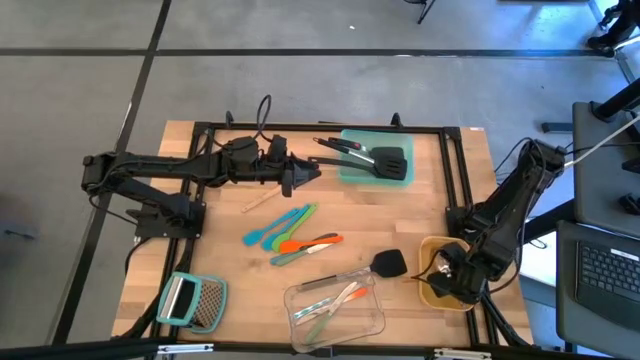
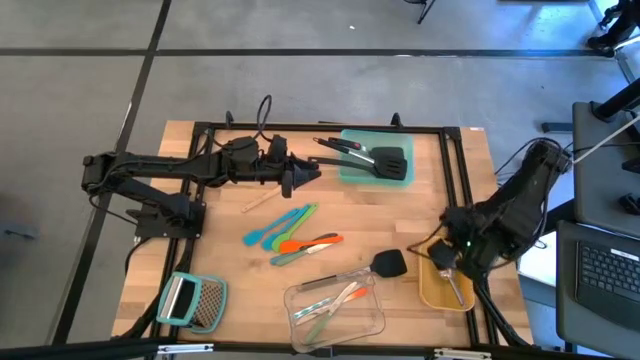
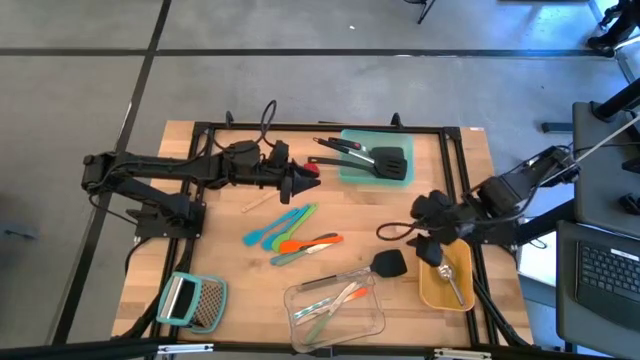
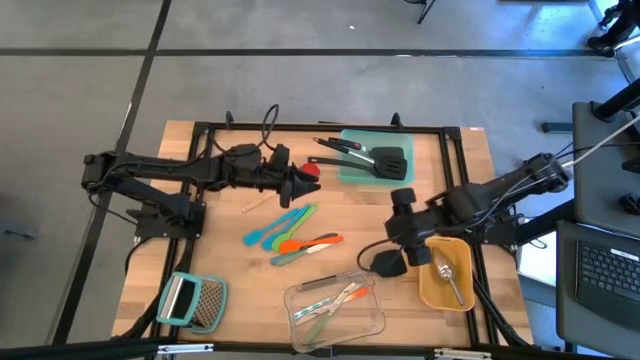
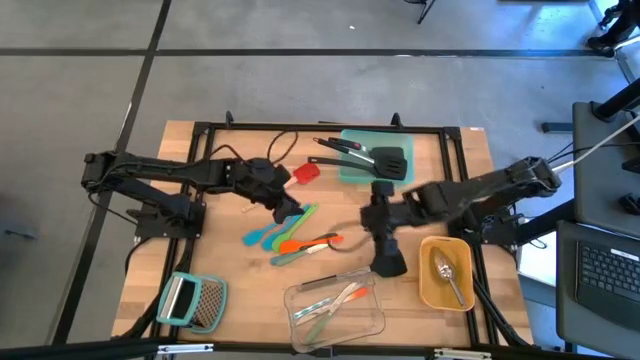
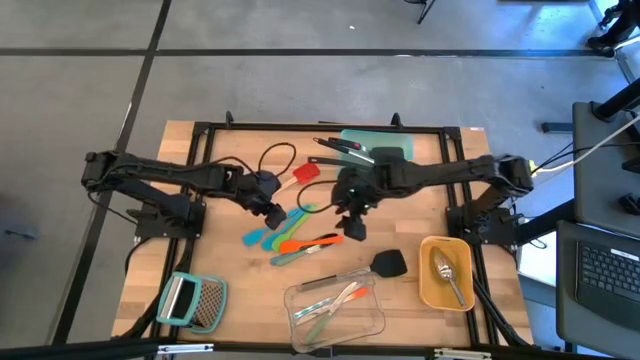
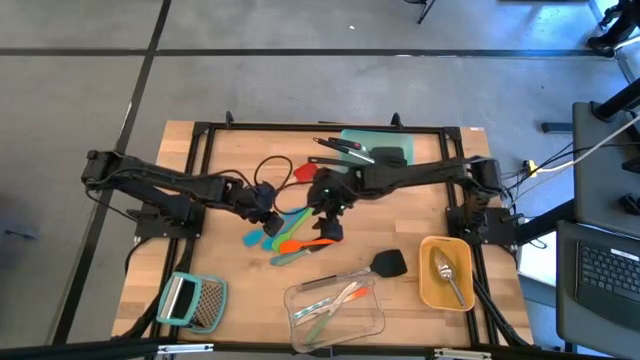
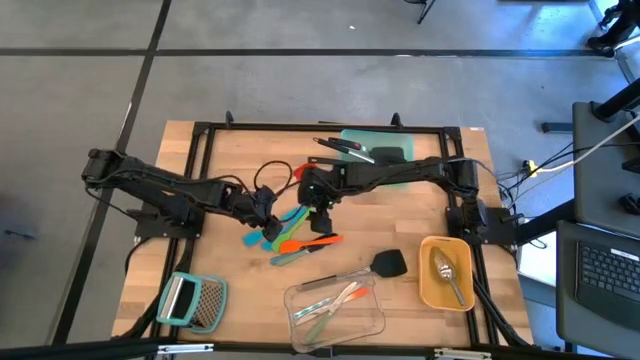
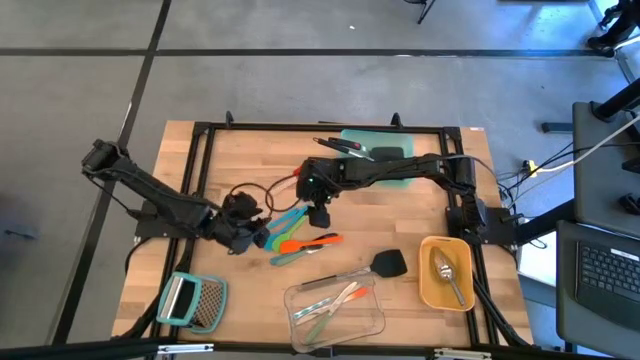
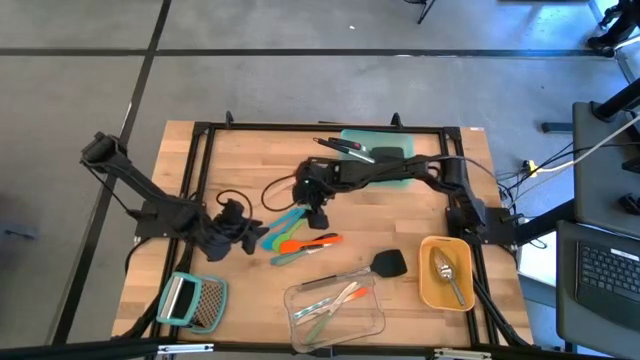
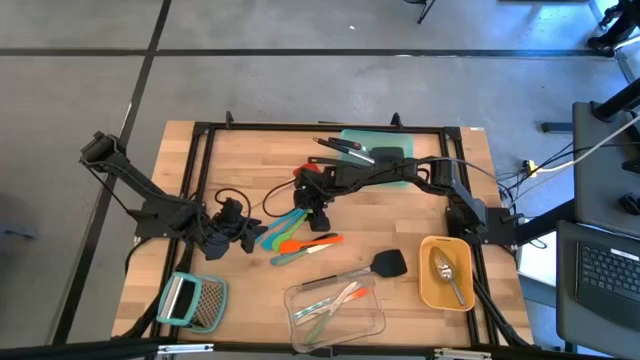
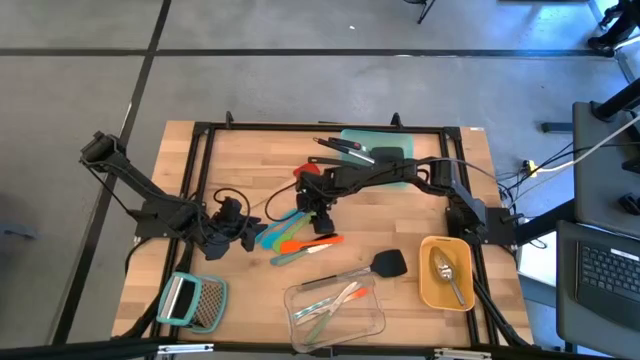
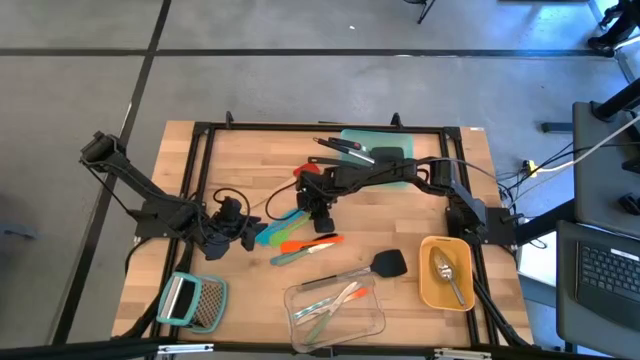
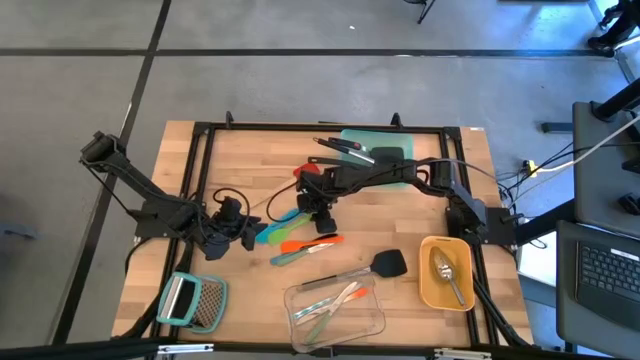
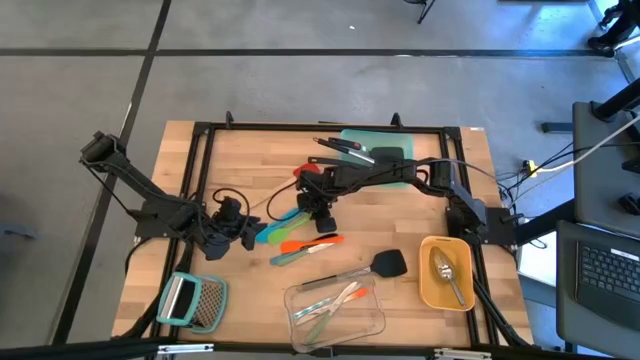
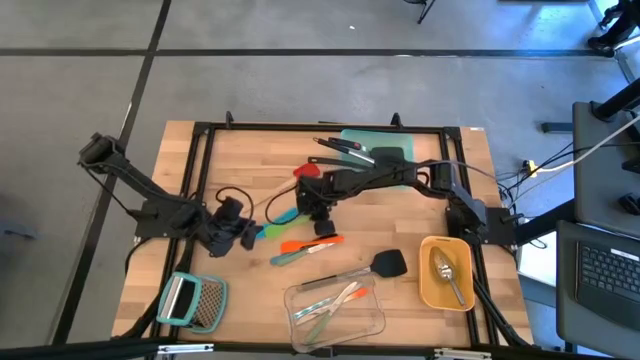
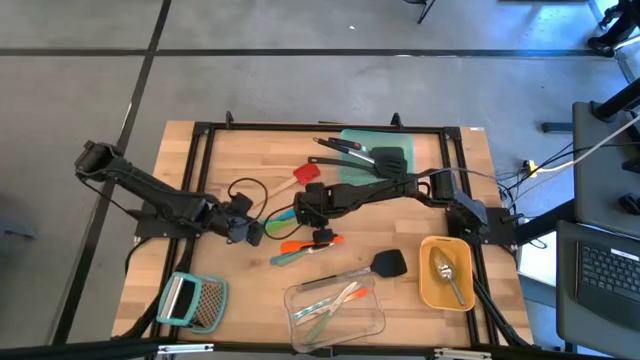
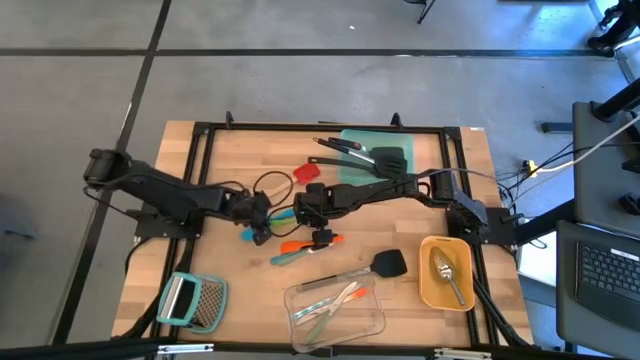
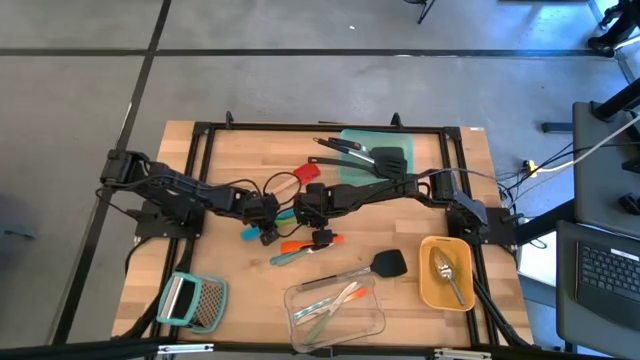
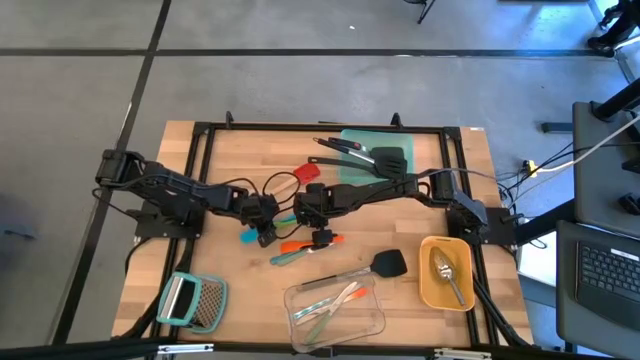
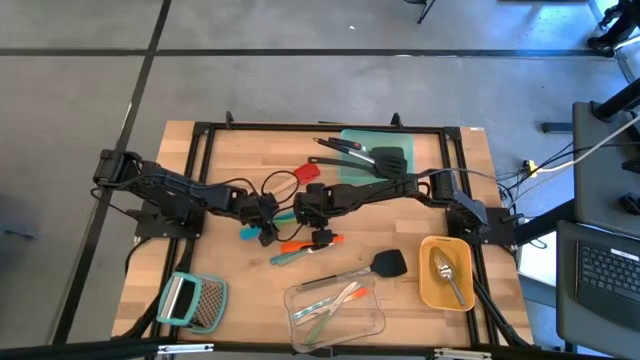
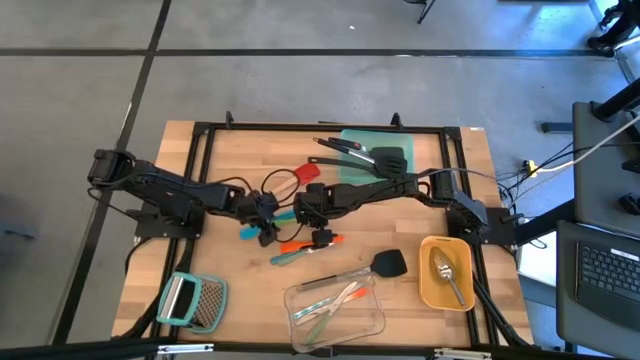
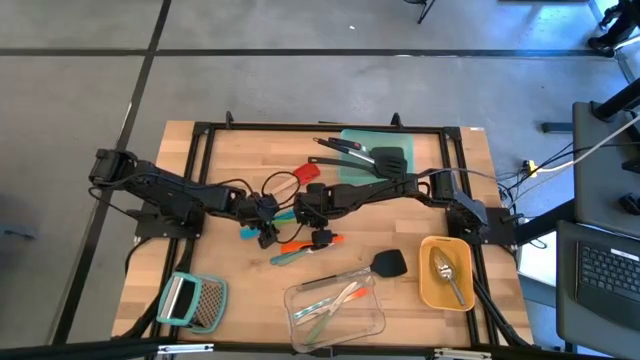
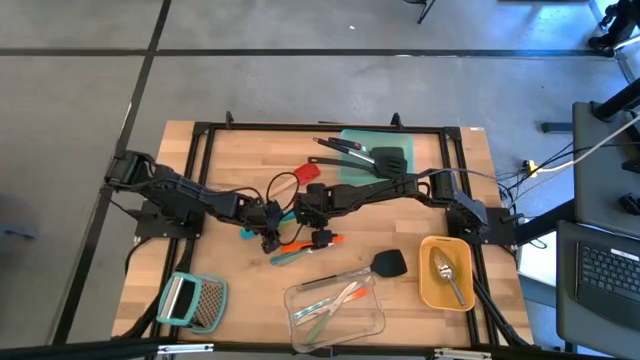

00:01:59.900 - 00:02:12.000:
Task: Pick & Place Kitchen Items
Put the green spatula into the green bin

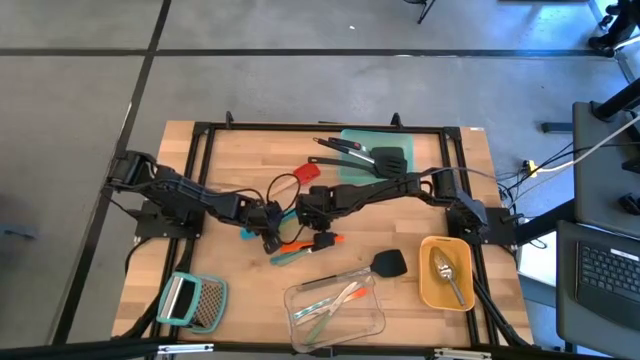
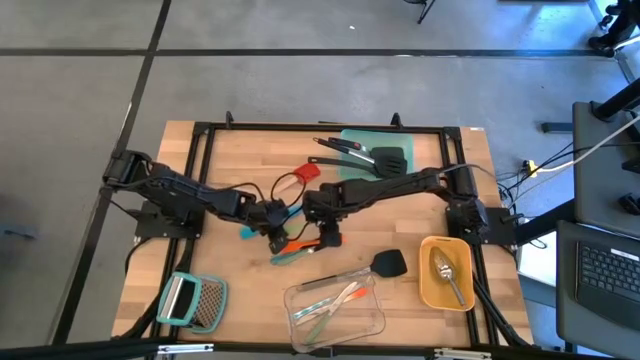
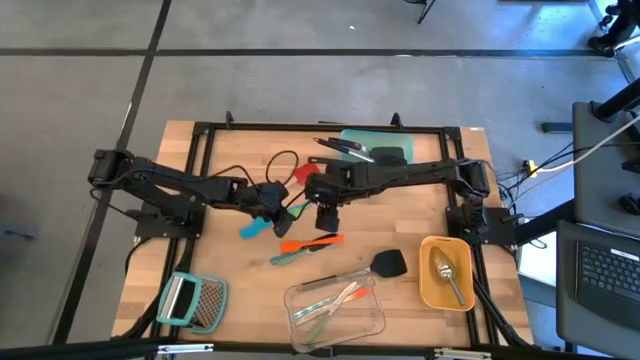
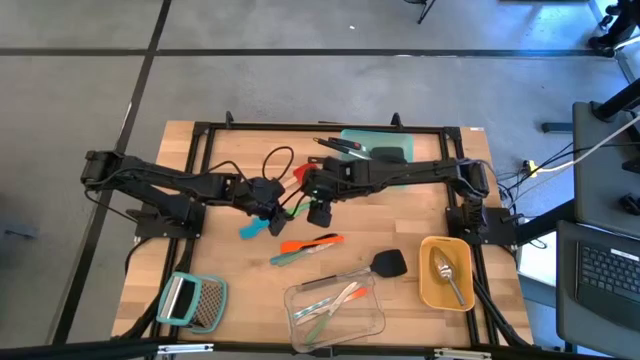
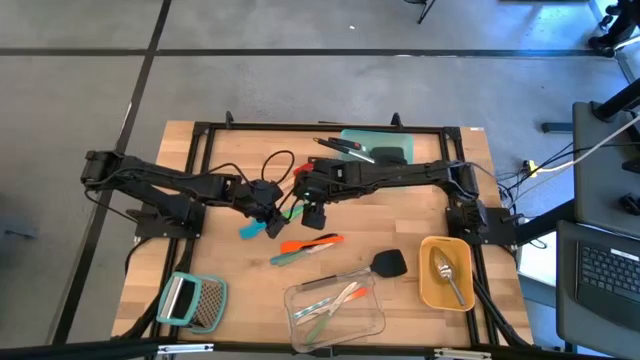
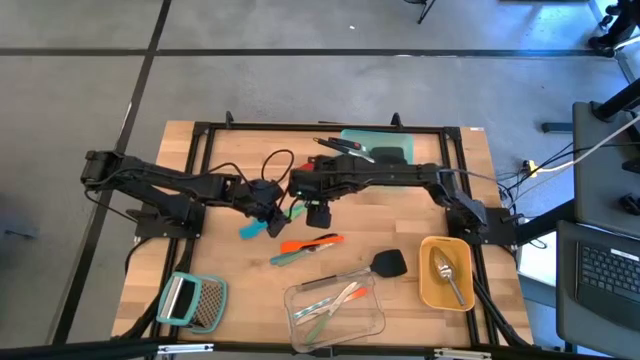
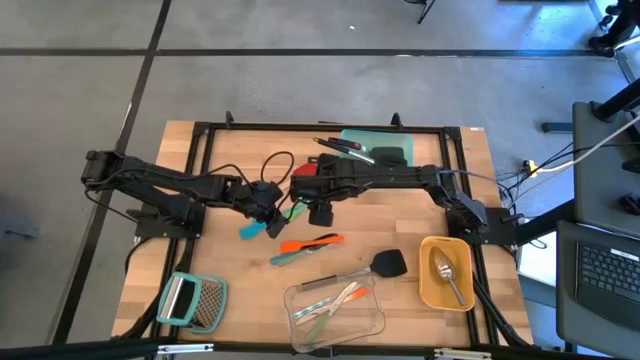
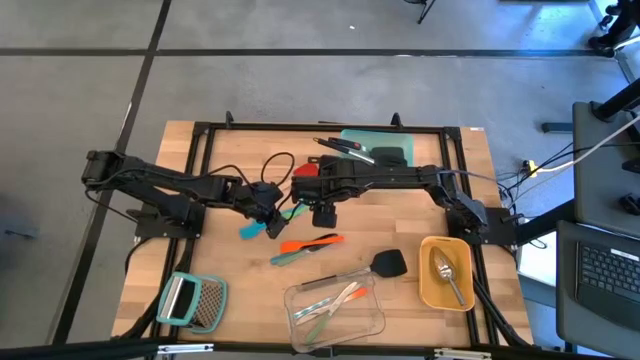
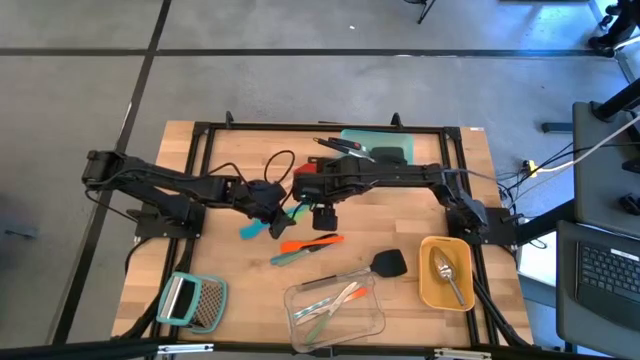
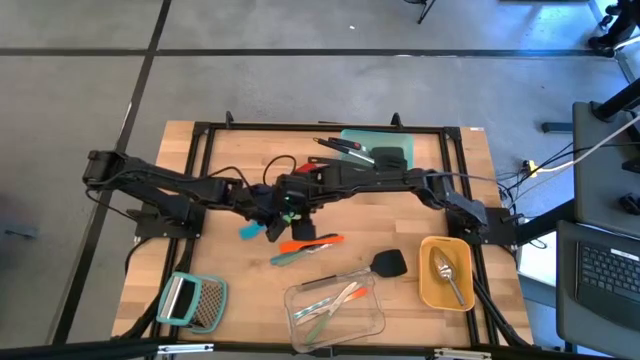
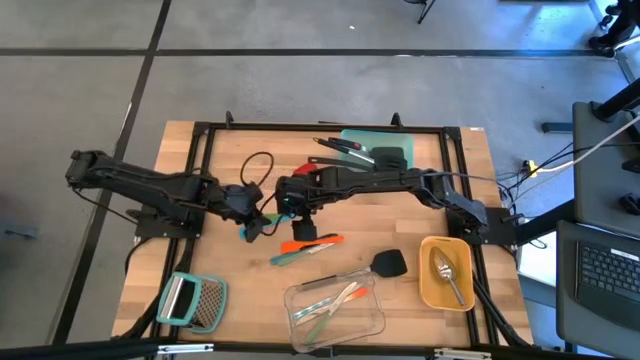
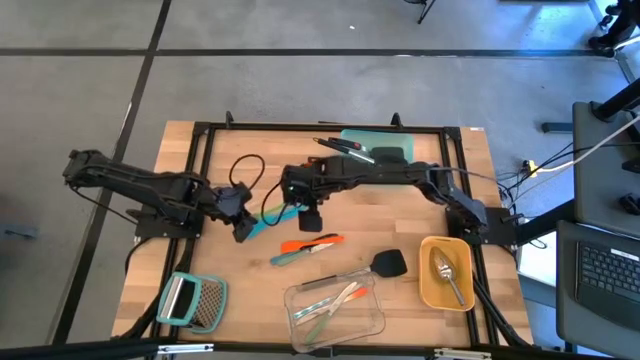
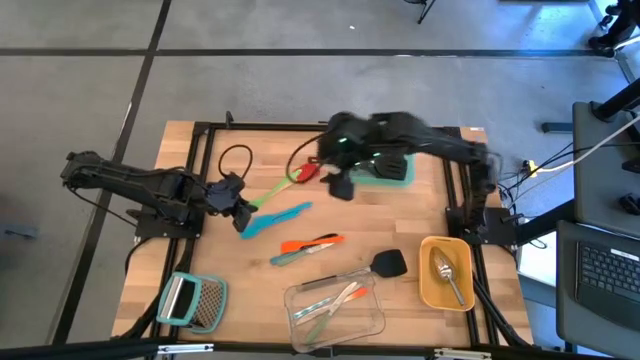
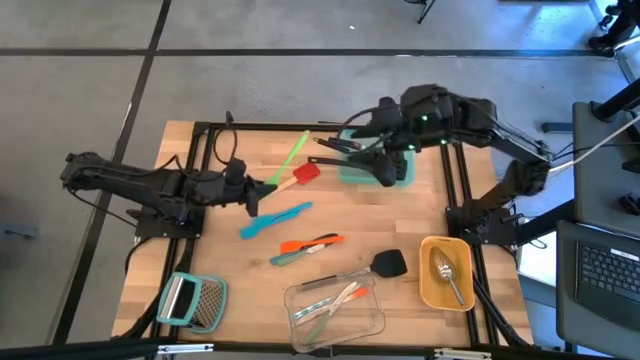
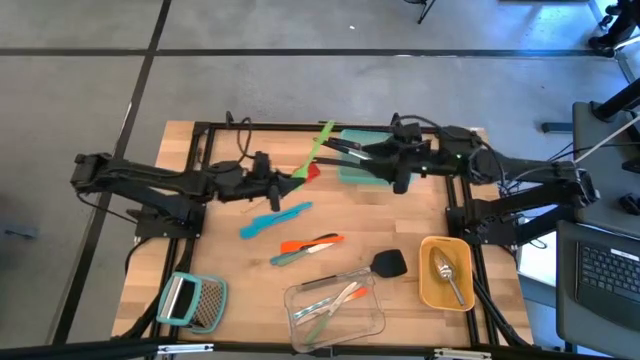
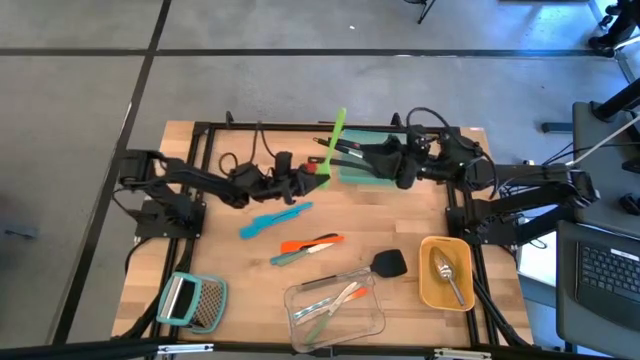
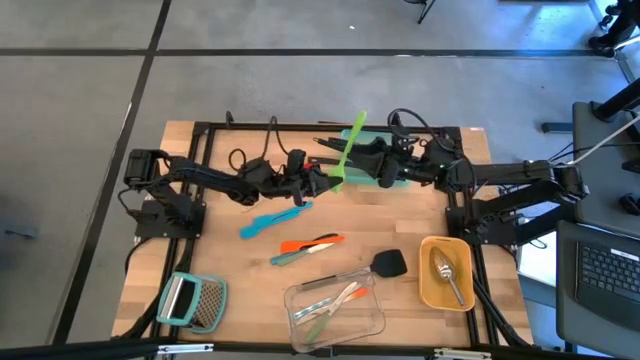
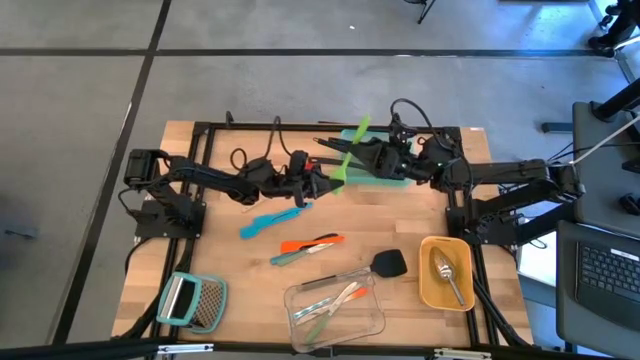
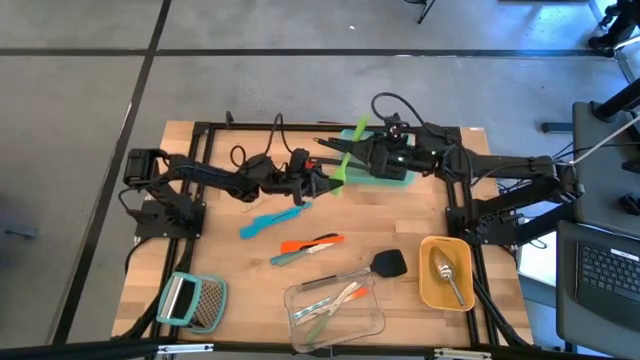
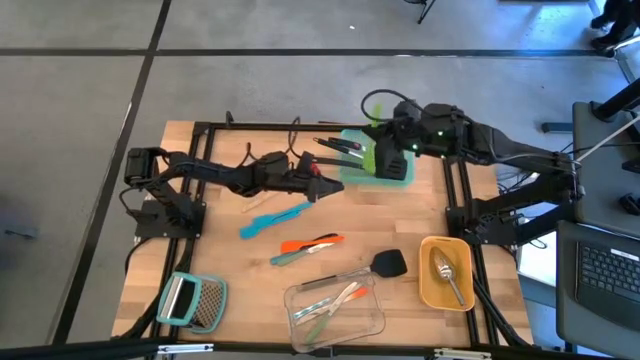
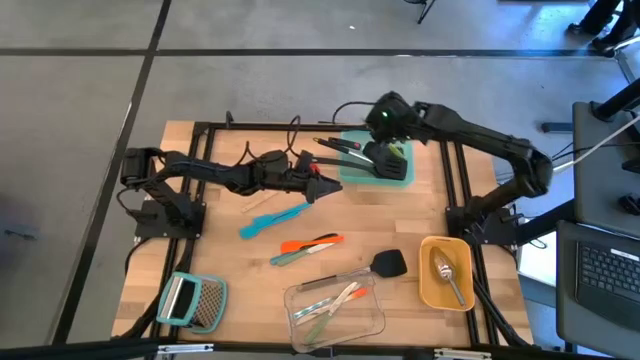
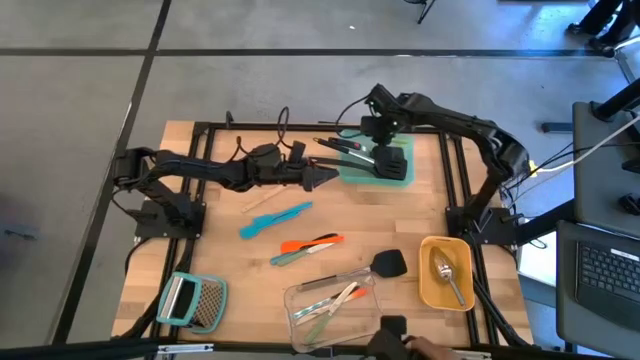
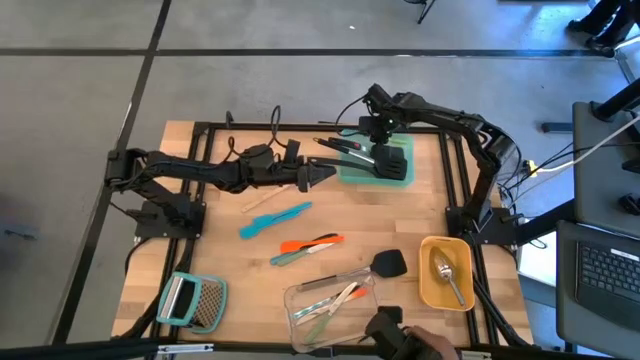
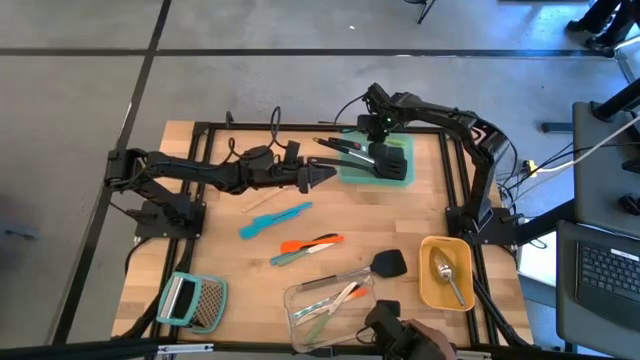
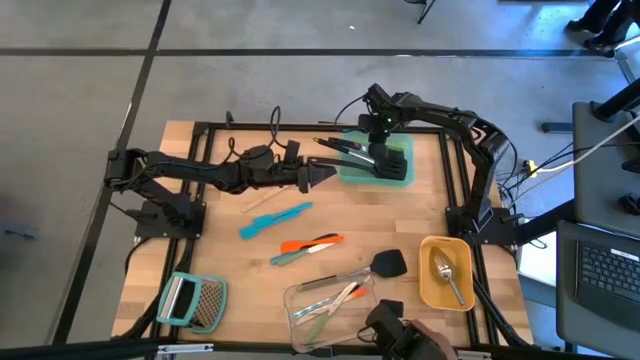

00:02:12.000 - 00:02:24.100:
Put the green spatula into the green bin
